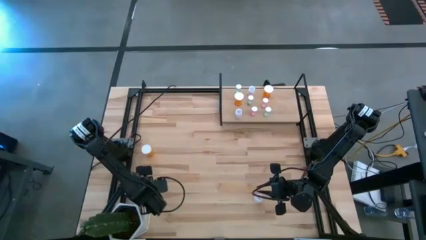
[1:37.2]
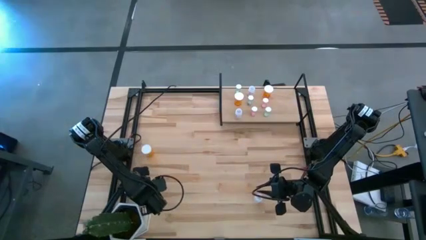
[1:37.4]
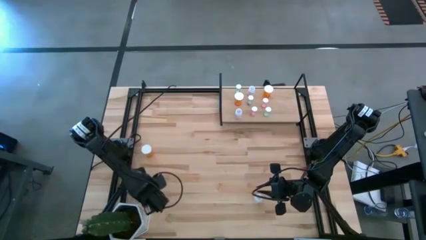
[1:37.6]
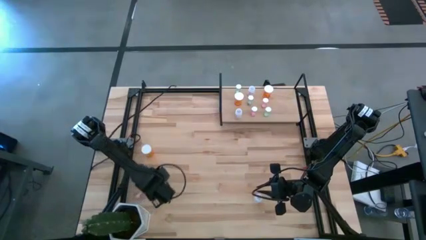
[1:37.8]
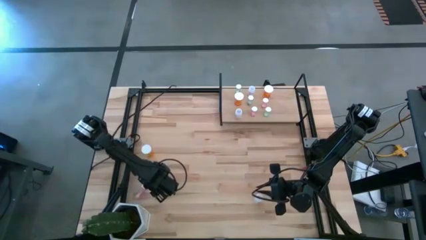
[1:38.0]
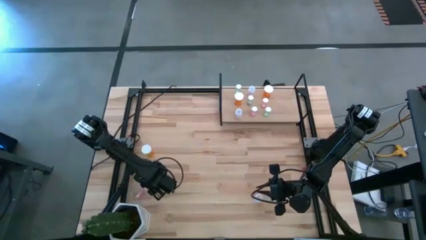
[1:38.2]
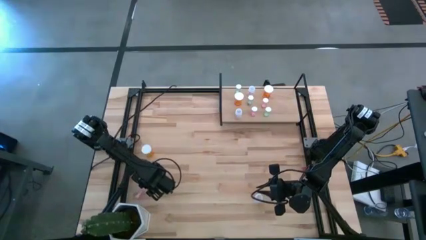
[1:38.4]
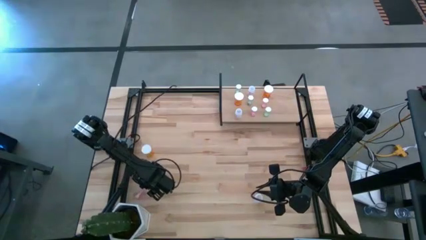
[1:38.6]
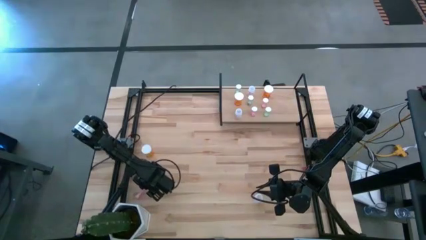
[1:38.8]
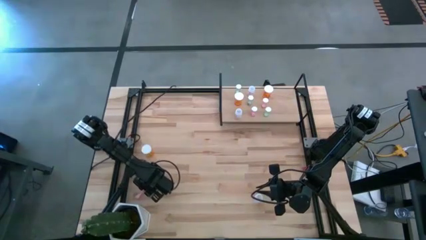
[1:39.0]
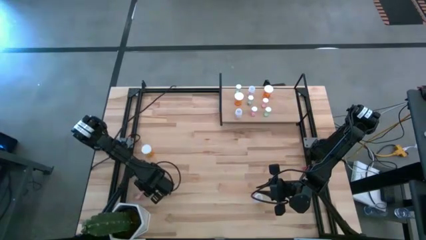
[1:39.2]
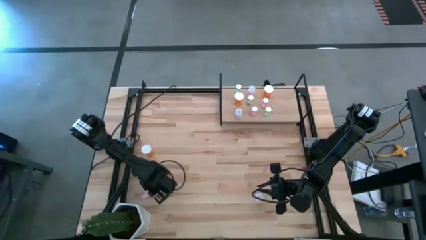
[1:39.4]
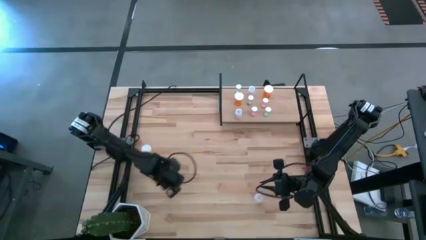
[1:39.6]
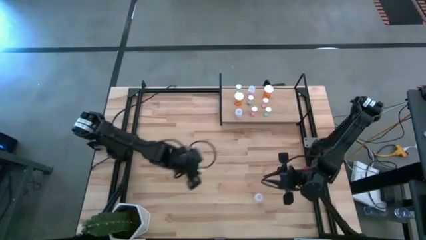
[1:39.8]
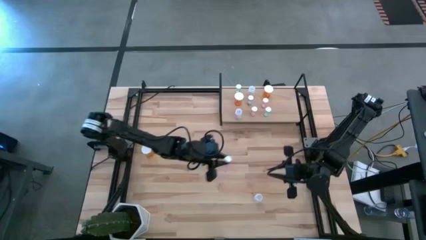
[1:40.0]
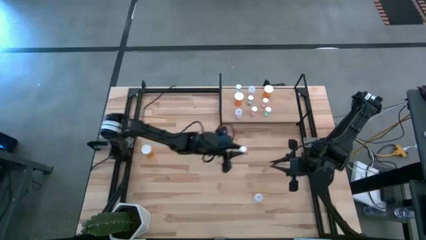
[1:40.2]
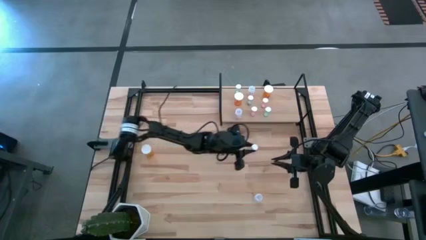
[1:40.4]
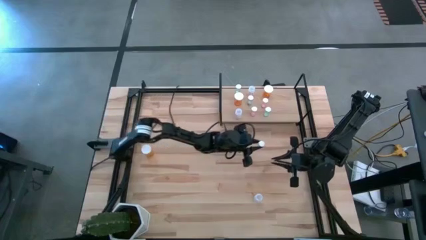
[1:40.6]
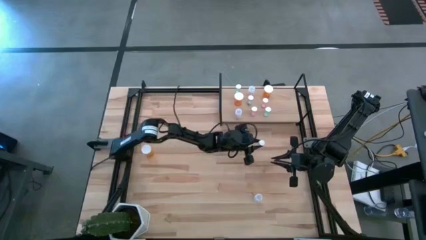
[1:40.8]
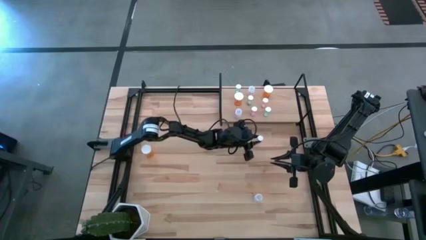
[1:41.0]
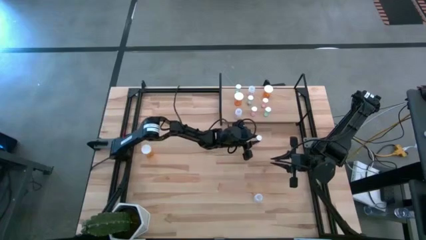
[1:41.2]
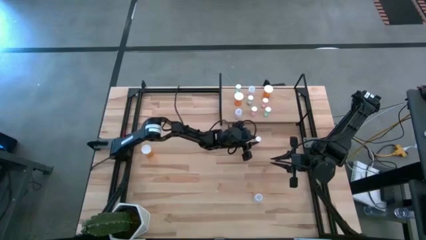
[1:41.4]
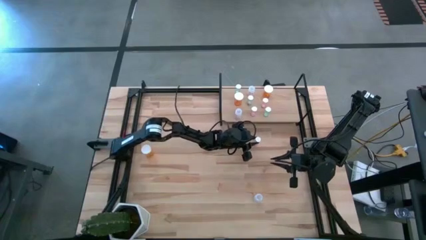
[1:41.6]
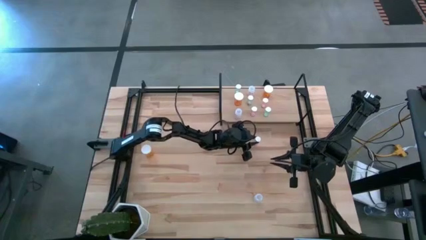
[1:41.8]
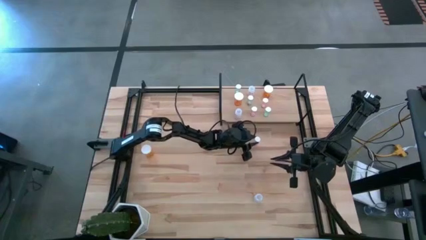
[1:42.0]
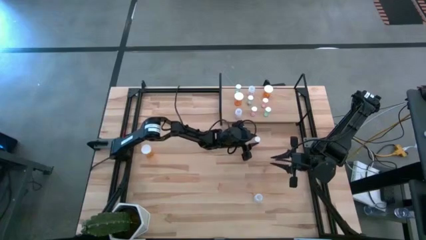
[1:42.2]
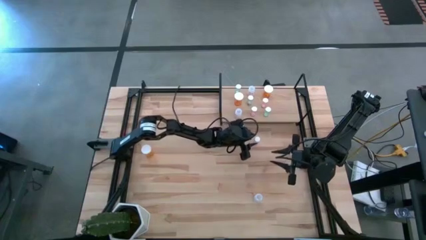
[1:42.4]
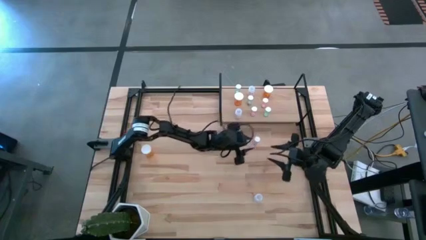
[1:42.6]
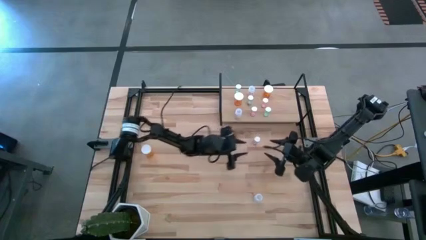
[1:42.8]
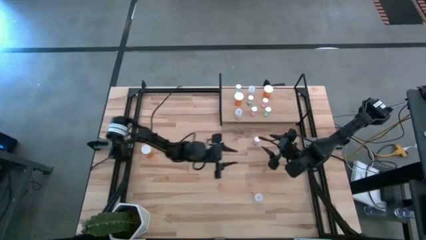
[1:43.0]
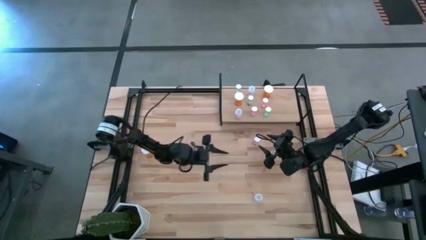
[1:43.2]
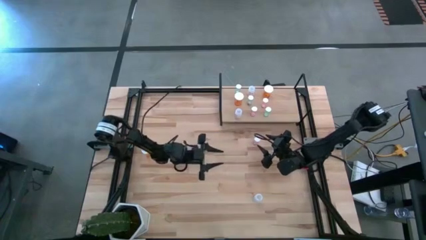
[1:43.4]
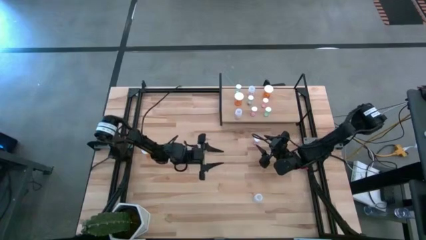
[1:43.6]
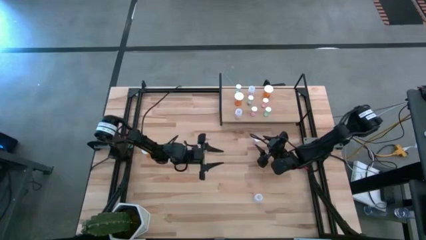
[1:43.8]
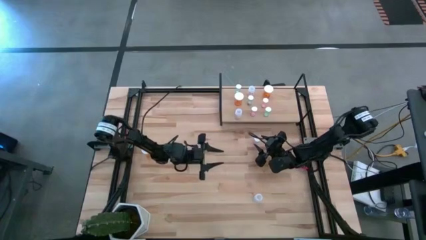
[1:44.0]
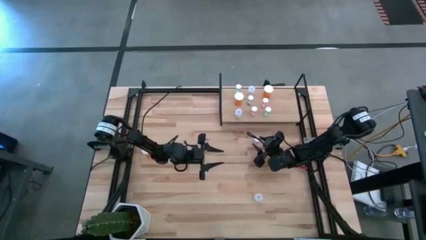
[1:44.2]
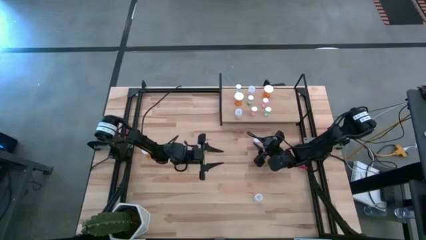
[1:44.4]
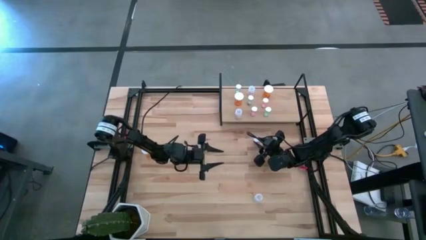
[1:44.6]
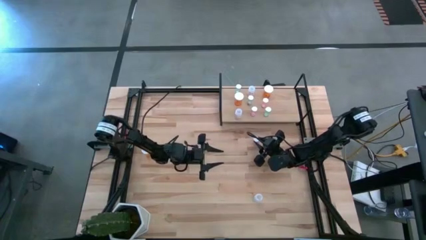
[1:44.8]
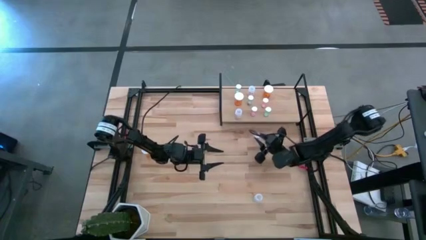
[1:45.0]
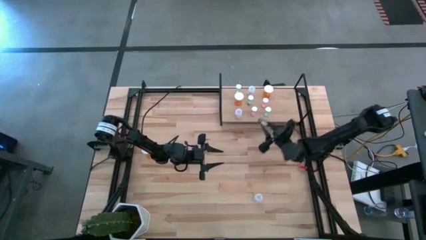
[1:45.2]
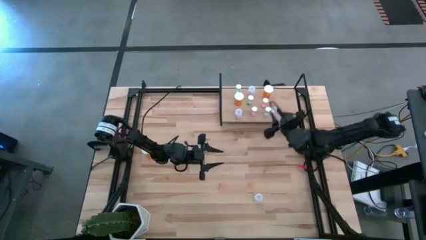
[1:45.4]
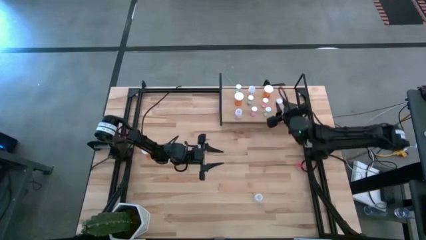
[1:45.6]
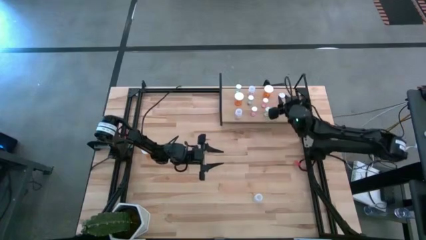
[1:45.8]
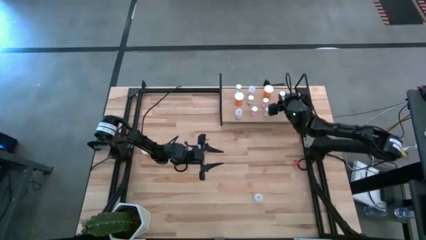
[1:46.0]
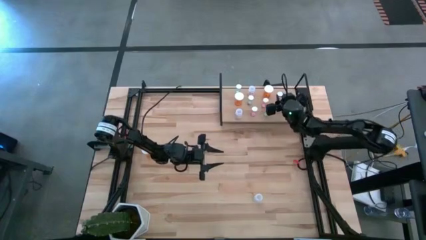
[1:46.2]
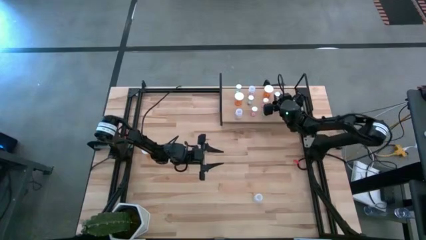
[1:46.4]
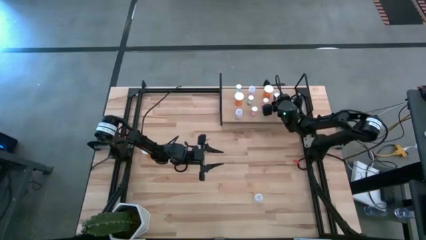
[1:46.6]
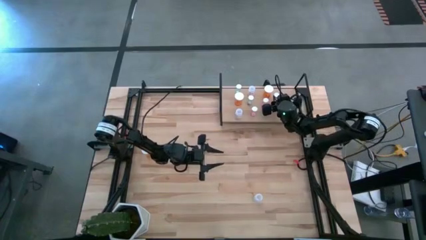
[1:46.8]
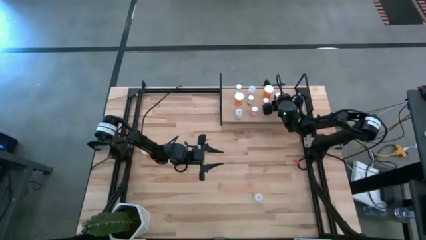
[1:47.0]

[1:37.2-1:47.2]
Task: Pick and place medicine bottles onto shelf by color
Put the pink pill bottle on the shelf

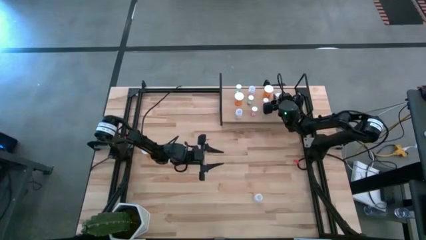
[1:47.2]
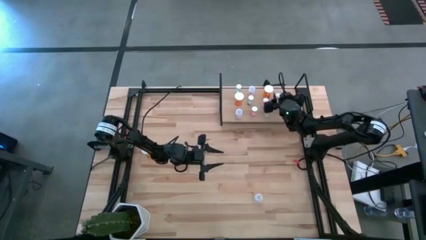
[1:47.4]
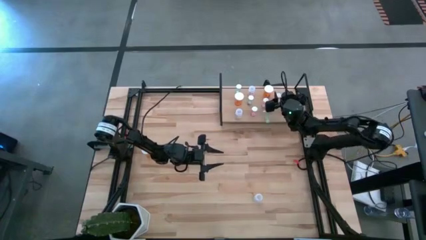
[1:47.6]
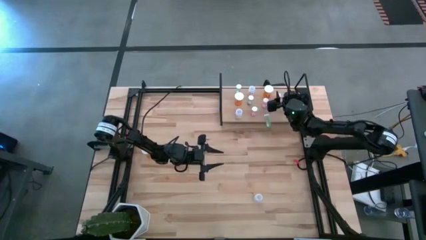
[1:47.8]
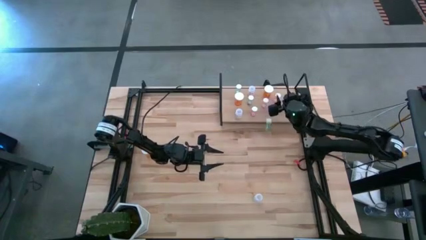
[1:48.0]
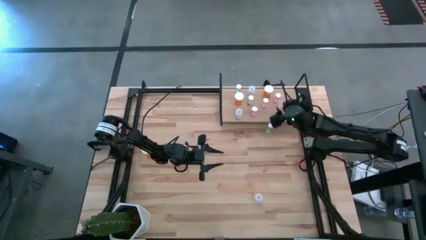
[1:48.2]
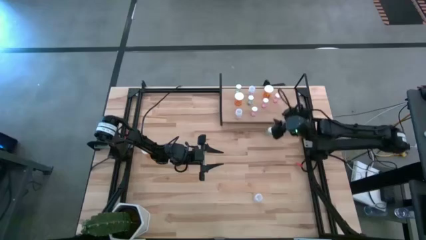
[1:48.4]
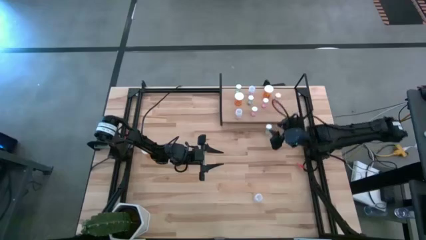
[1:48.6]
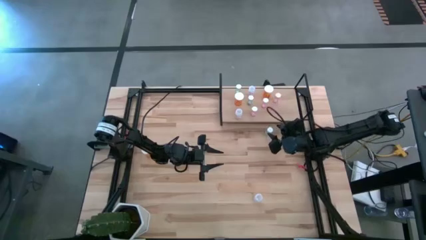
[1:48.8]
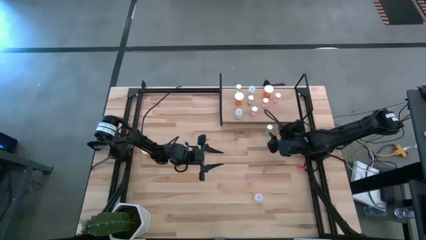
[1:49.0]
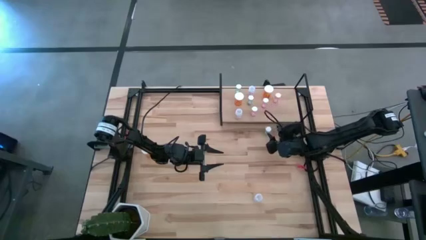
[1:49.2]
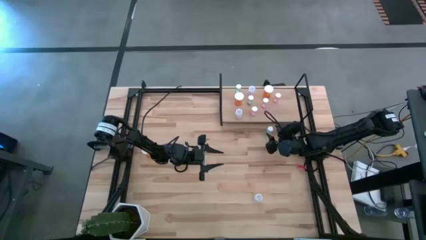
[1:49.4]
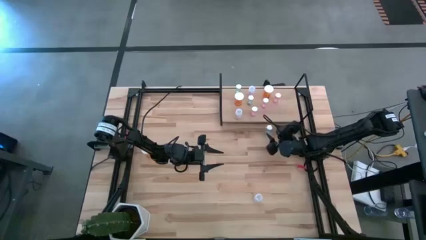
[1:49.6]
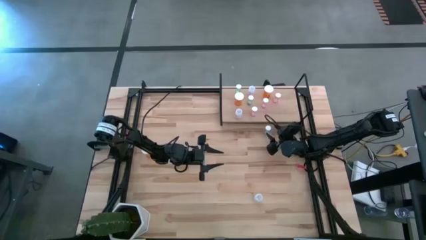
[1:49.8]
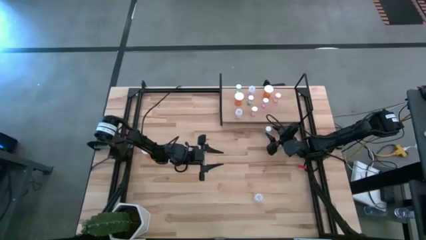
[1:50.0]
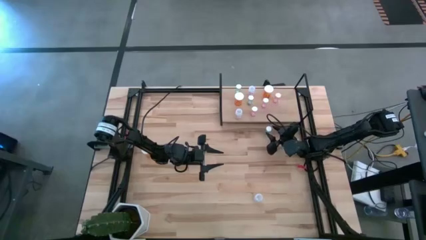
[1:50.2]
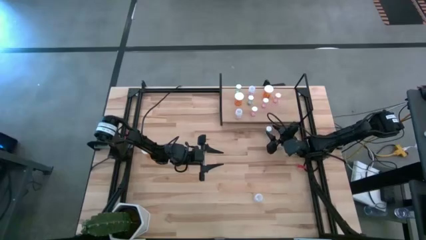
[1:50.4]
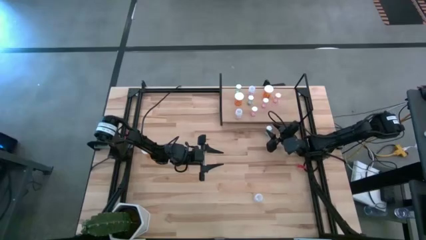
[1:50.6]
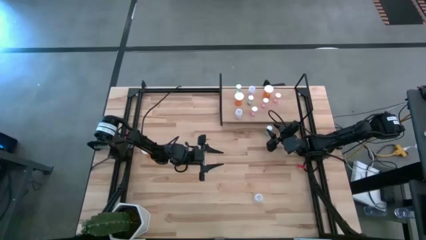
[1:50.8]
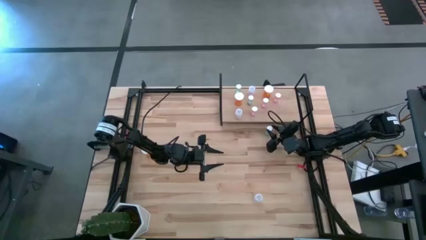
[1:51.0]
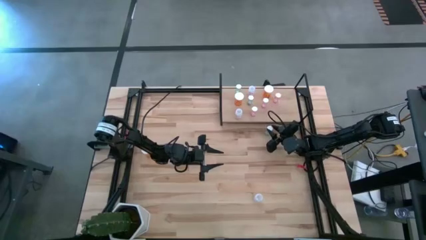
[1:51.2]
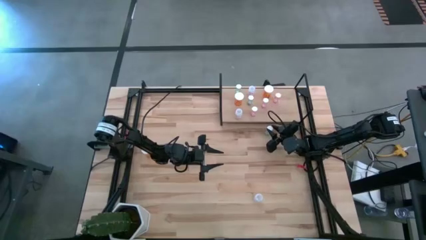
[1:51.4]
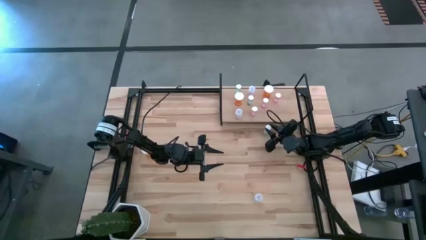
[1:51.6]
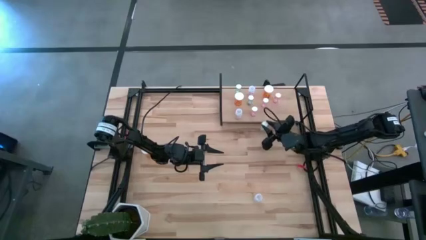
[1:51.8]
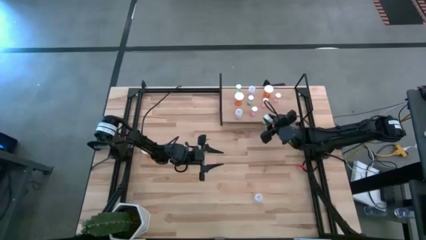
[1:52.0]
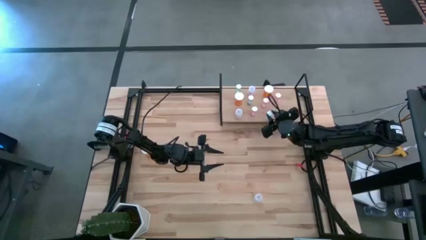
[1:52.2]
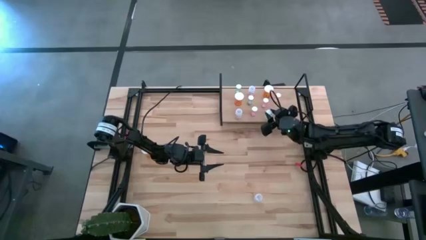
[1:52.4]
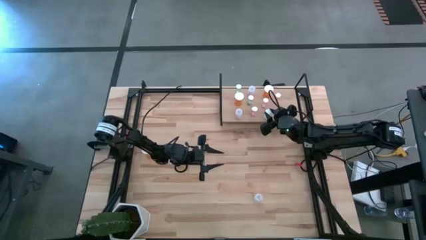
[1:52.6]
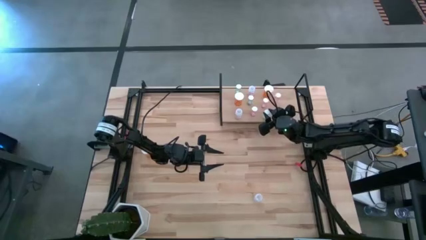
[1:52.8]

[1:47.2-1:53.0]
Put the blue pill bottle on the shelf

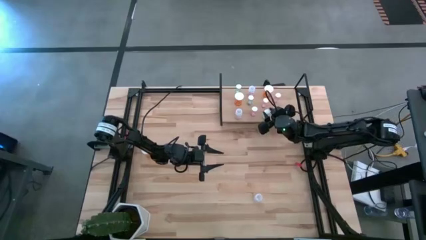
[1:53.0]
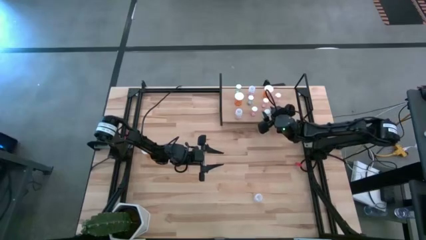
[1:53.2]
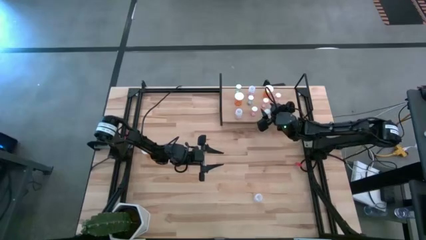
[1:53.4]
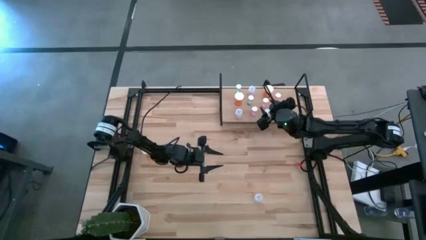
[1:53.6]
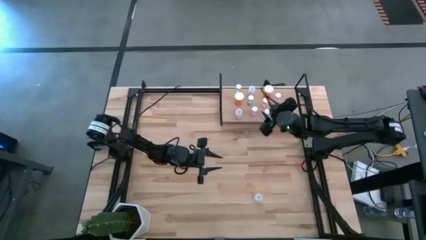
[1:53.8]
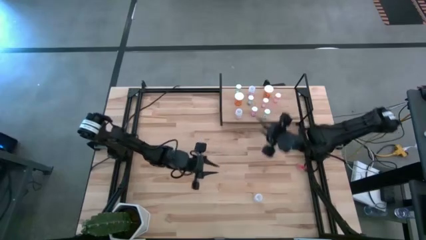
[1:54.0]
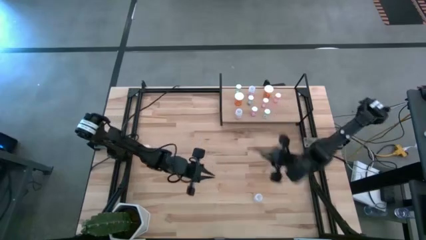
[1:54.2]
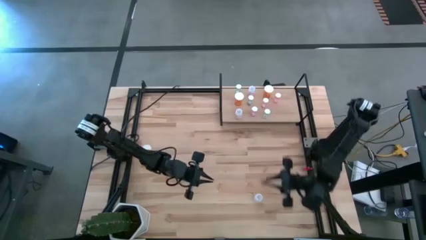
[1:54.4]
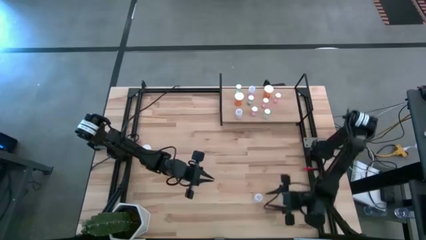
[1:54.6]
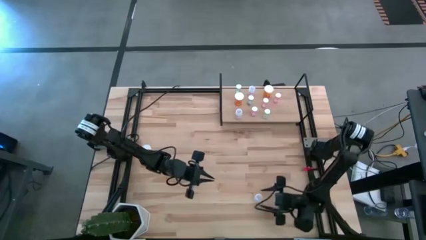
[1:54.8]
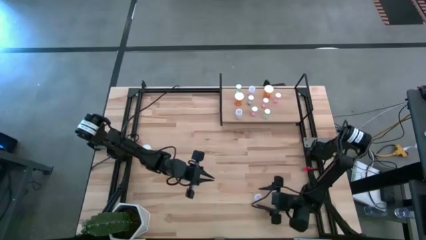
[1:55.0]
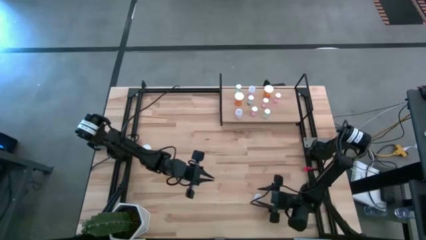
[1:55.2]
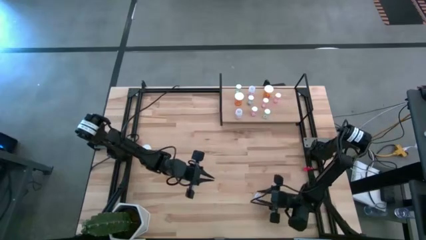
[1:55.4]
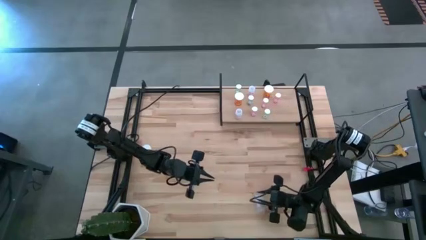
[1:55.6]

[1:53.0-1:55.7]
Put the transparent pill bottle on the shelf
